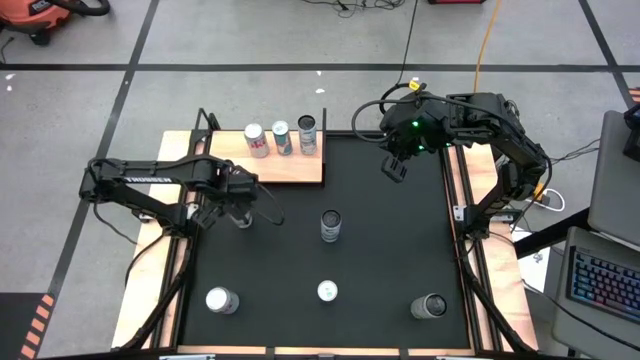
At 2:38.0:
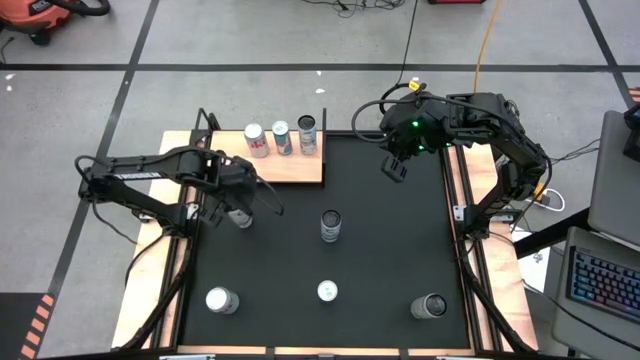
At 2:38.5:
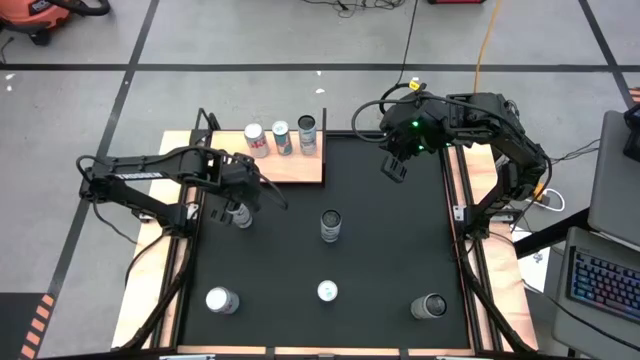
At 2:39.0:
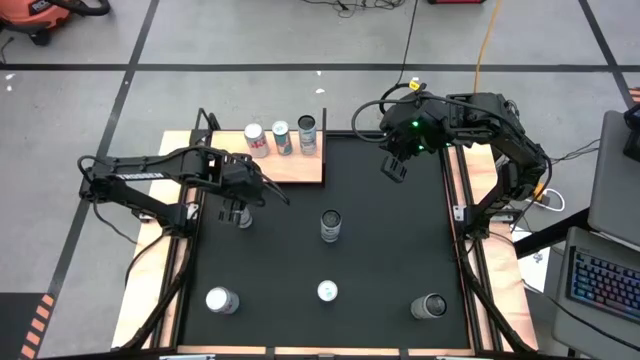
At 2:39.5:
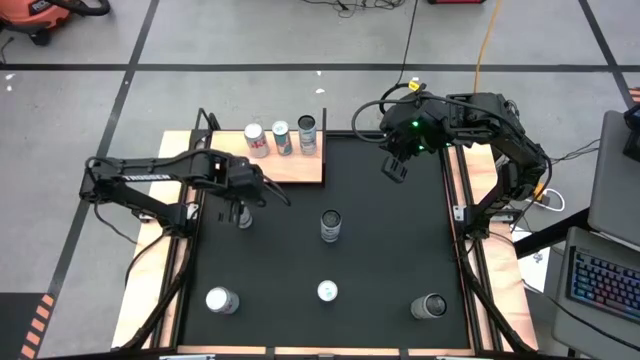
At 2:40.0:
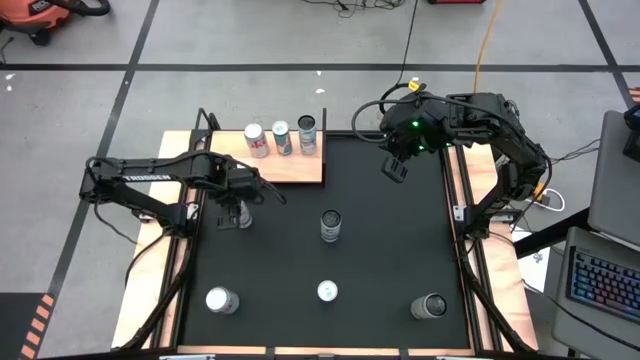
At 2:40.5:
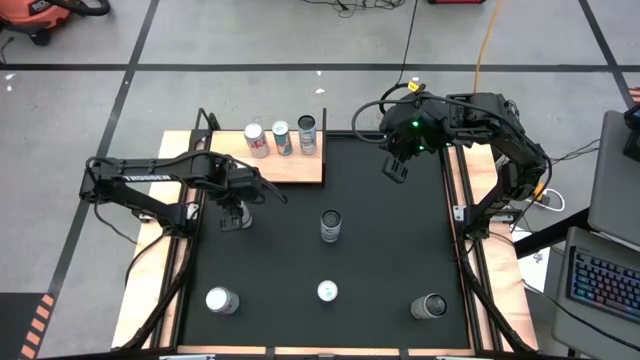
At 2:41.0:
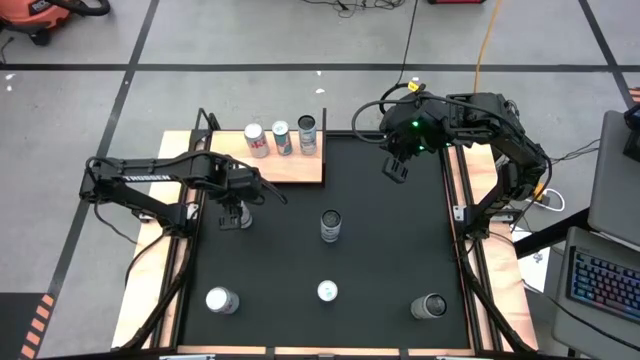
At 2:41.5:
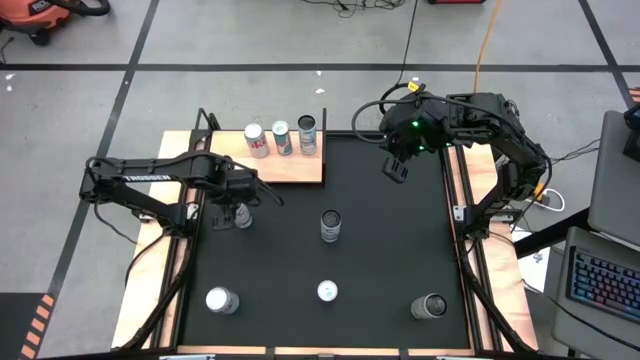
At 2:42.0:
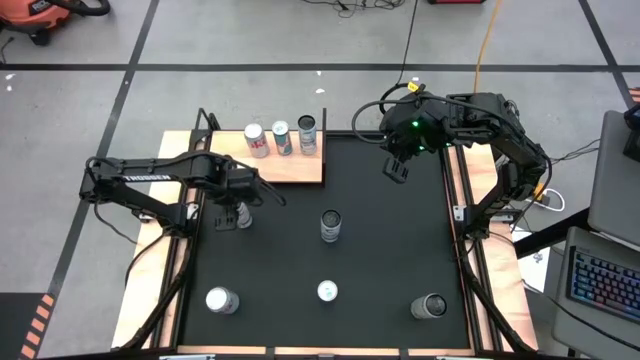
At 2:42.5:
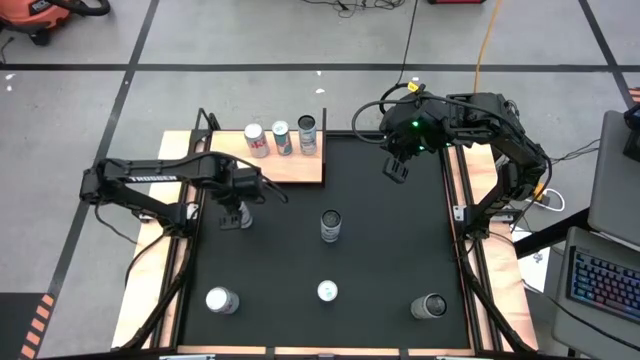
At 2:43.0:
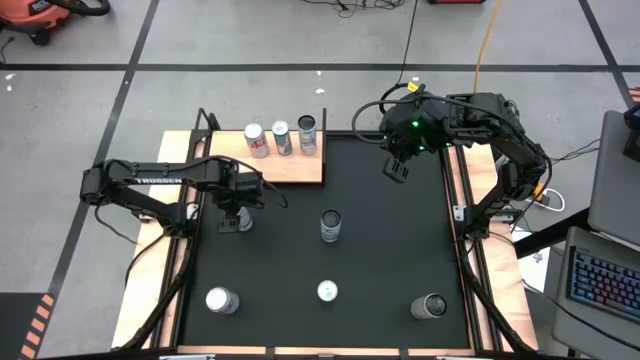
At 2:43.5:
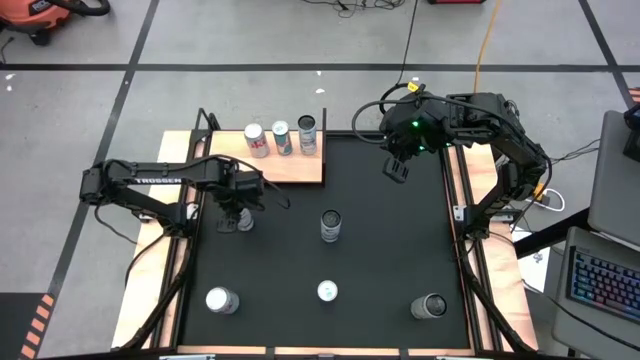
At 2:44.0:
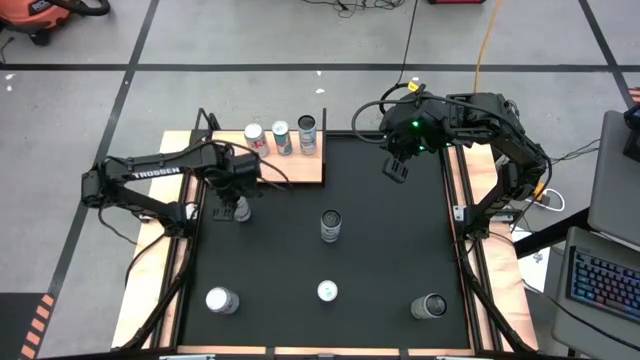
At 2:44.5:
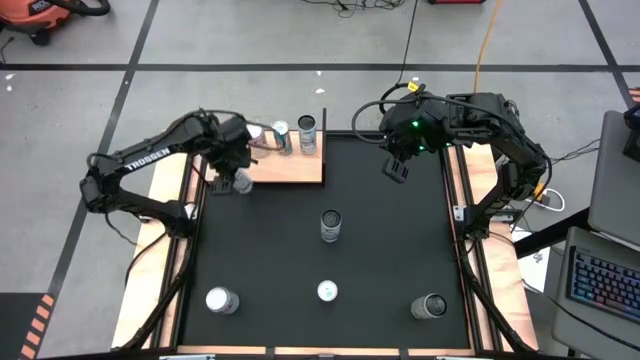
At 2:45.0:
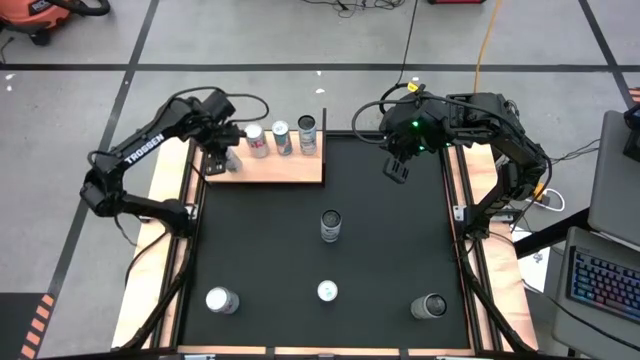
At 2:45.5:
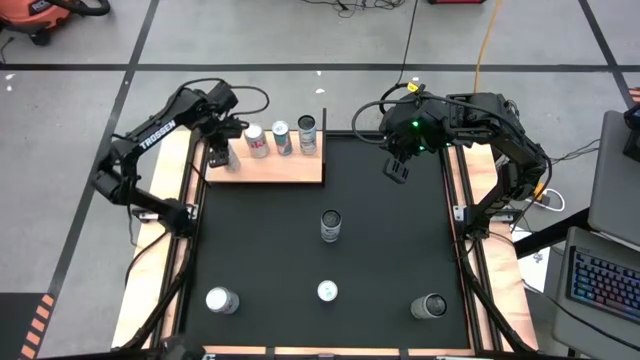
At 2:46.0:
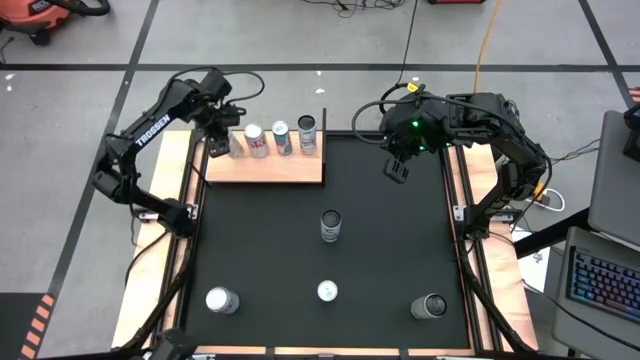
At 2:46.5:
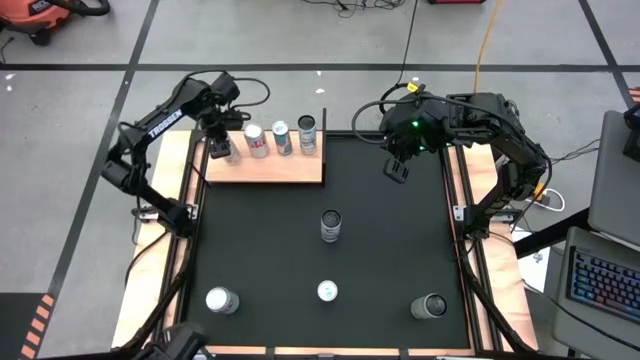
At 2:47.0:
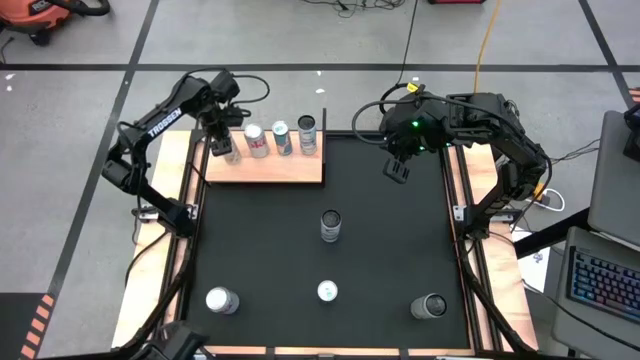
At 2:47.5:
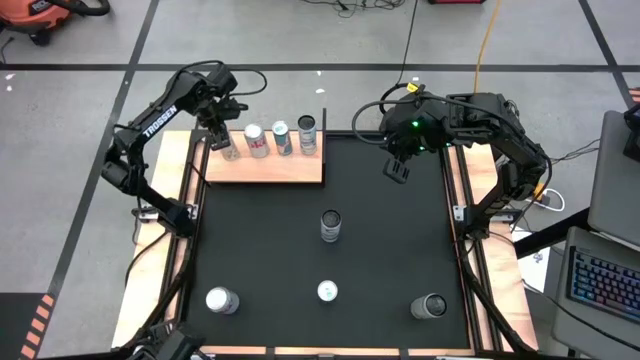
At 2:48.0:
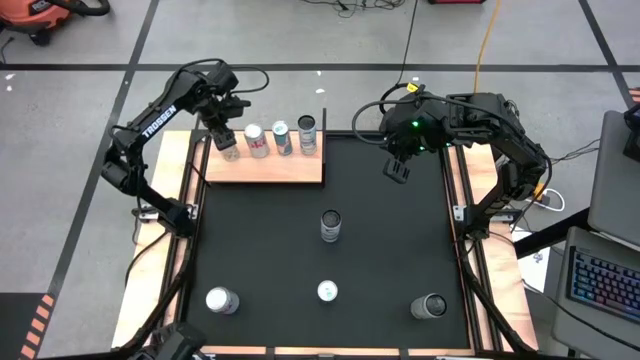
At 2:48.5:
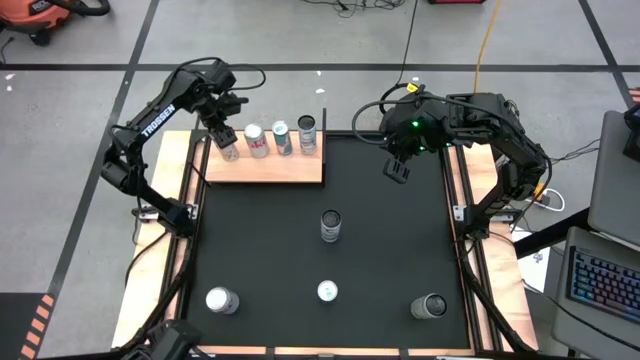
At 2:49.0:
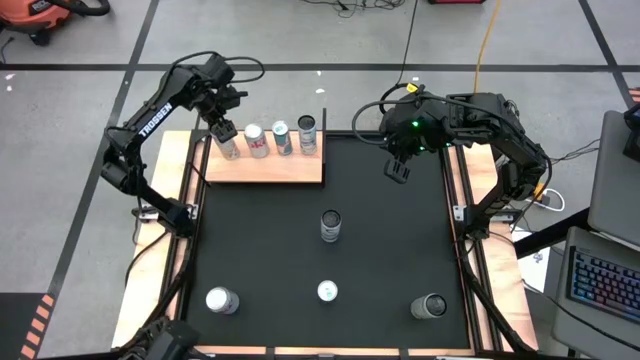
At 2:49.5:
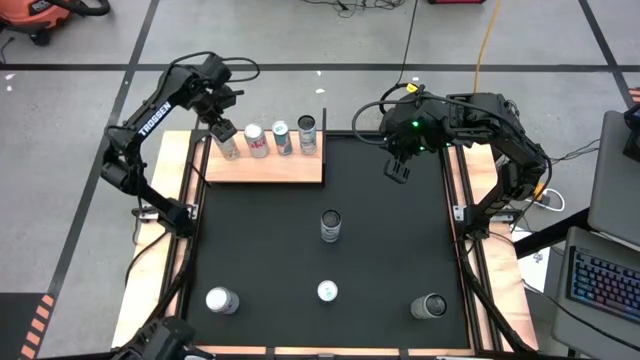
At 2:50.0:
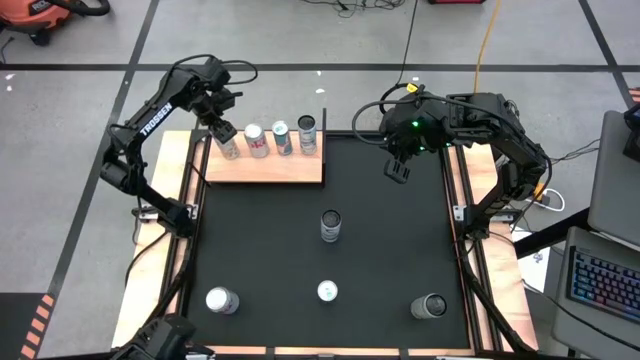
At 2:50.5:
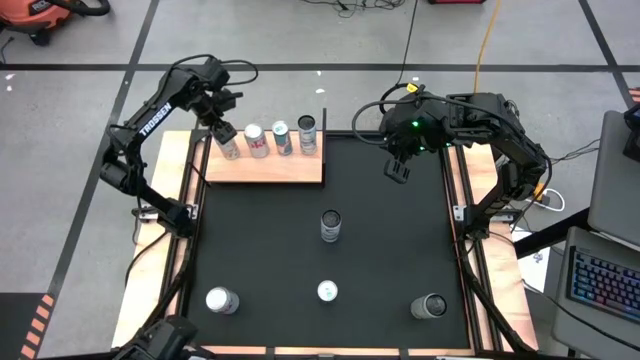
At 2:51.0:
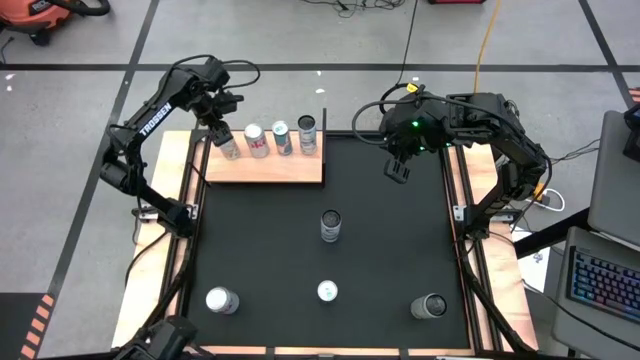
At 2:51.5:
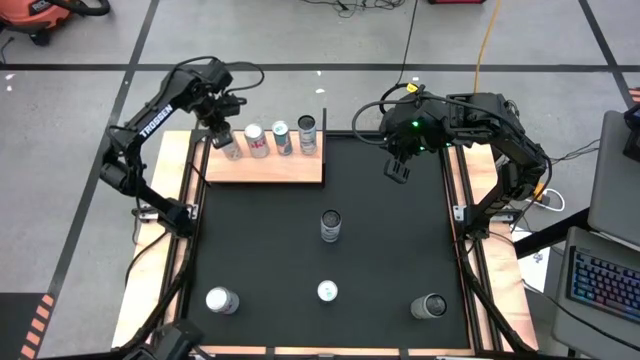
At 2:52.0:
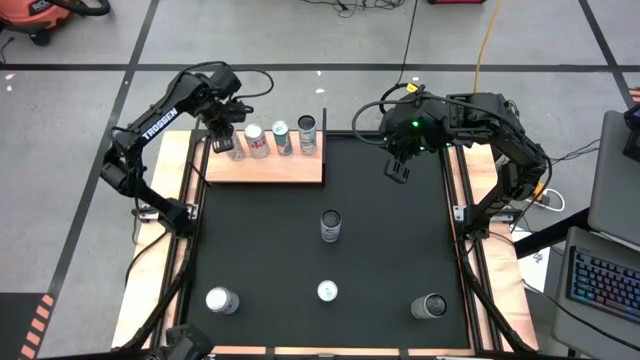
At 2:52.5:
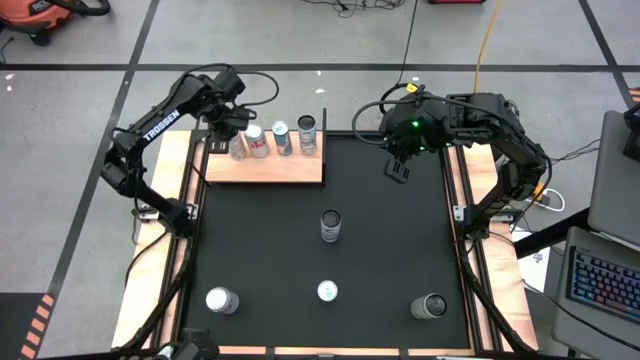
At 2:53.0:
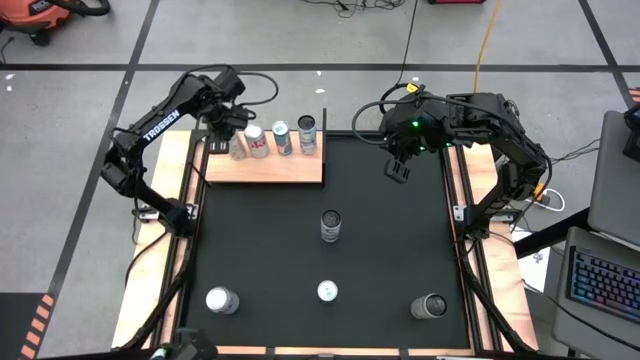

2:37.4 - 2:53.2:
Task: Place canned beverage on shelf
Put the top white-yellow soda can on the shelf

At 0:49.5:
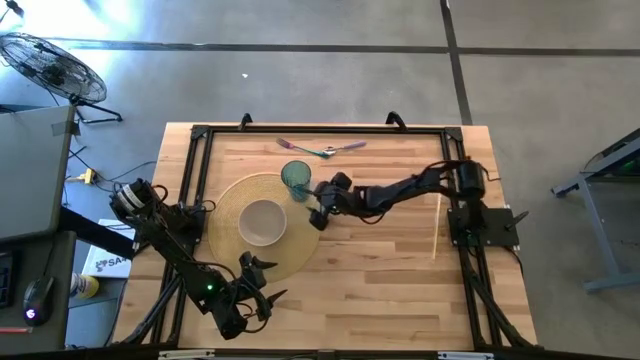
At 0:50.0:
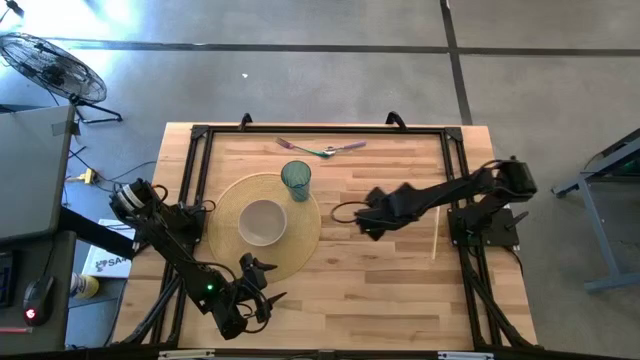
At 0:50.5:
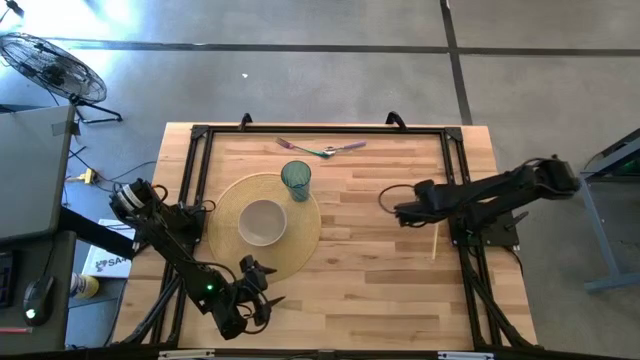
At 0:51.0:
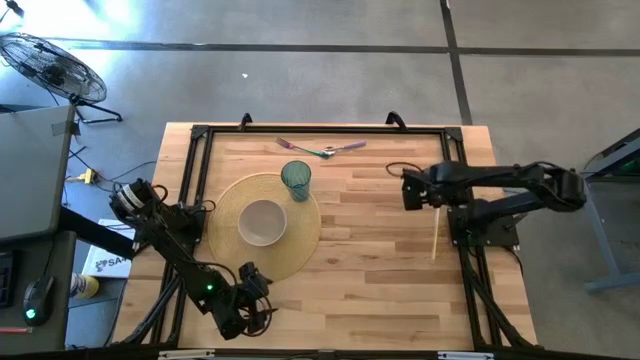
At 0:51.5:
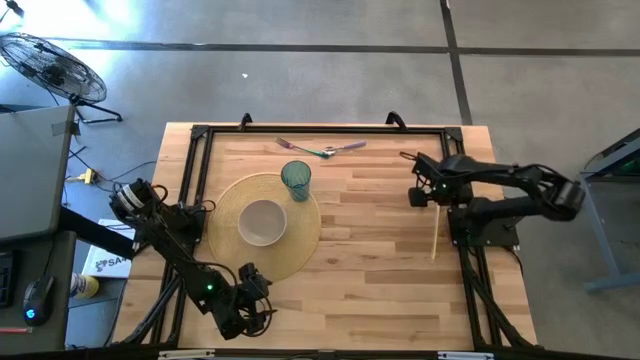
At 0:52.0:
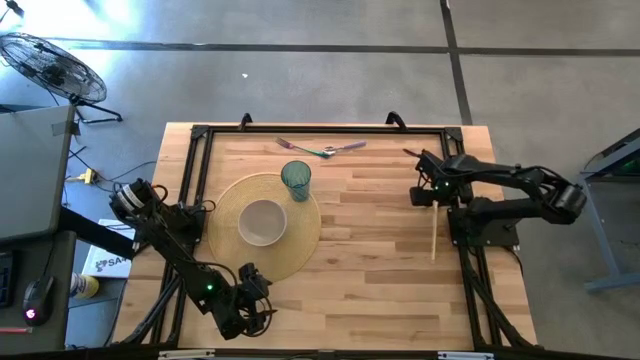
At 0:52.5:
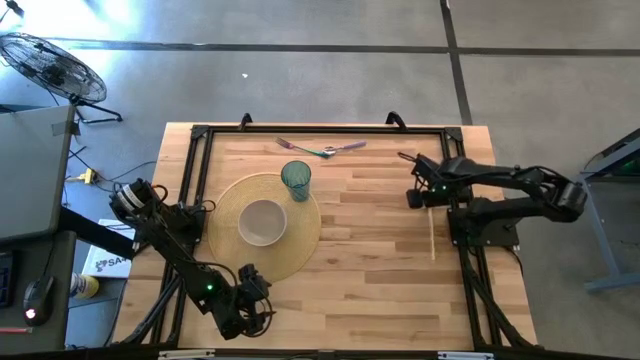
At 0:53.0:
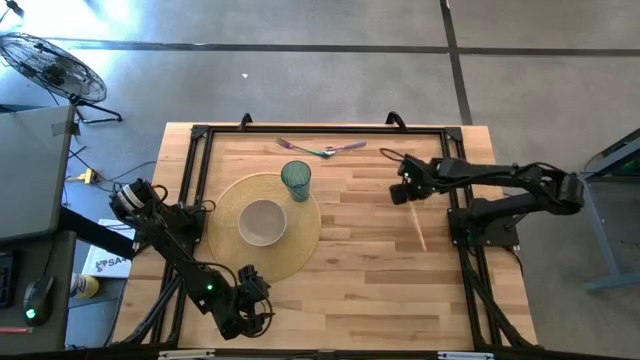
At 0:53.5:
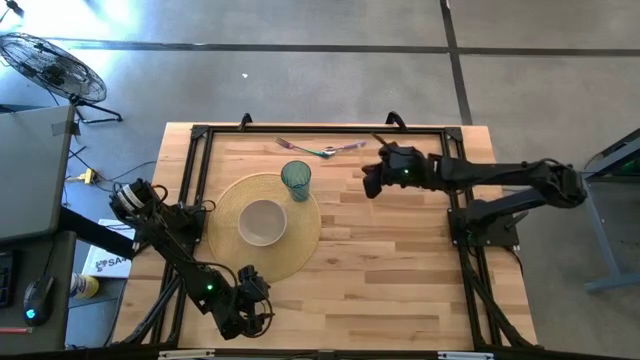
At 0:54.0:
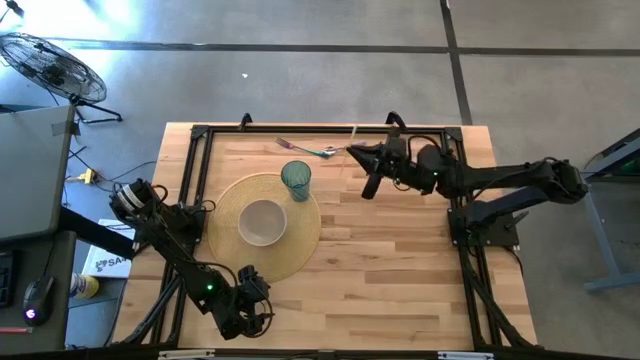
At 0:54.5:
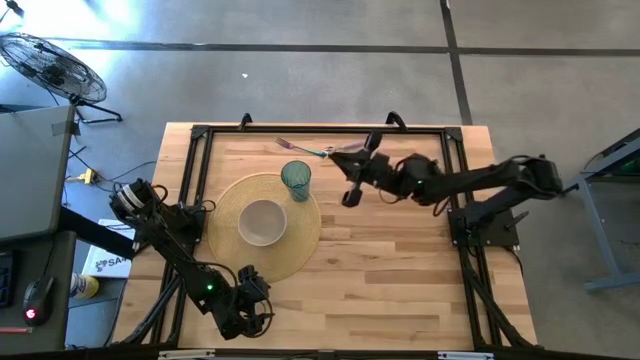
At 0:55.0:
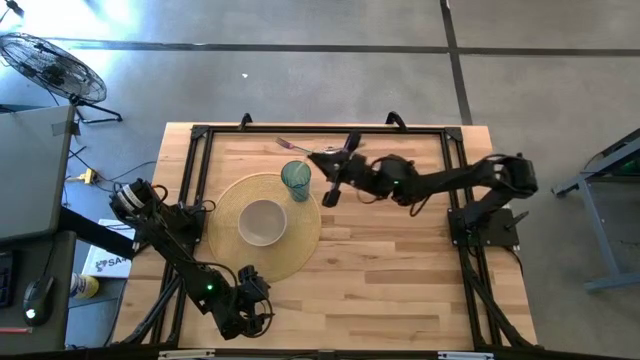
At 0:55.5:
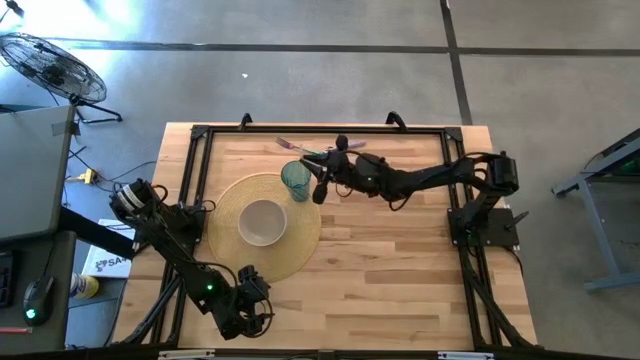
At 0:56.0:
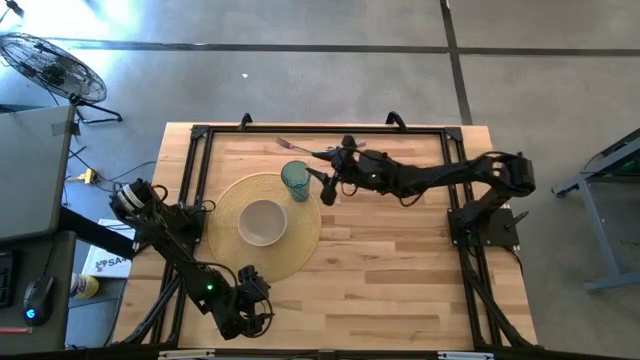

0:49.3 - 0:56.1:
Task: Pick & Place Utensil
Put the yellow straw into the blue cup
